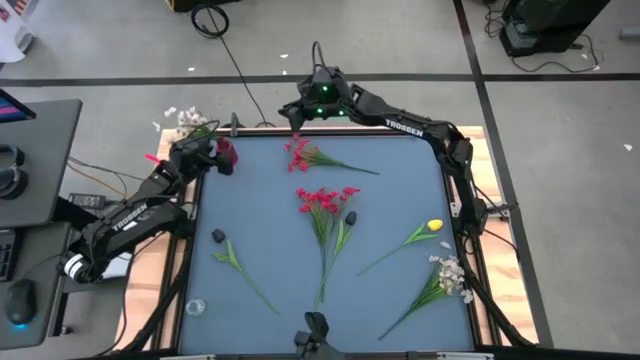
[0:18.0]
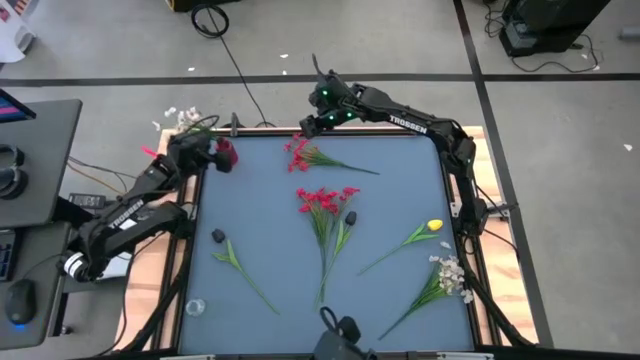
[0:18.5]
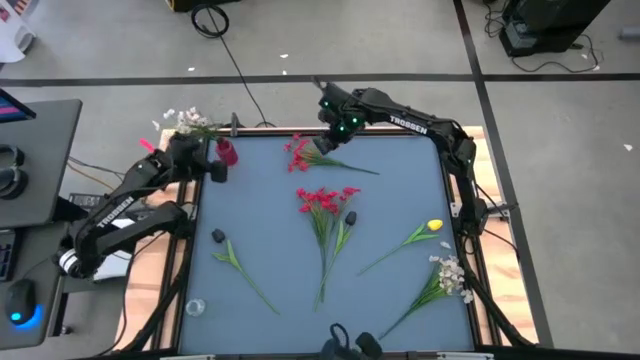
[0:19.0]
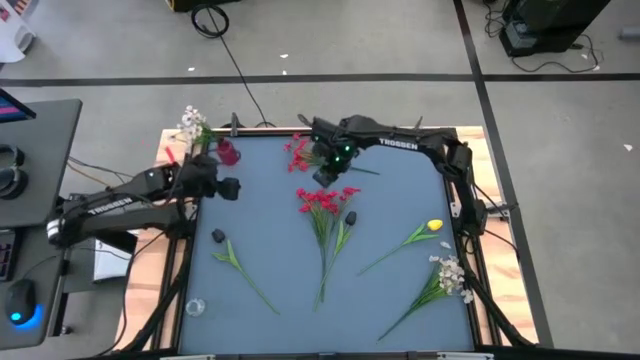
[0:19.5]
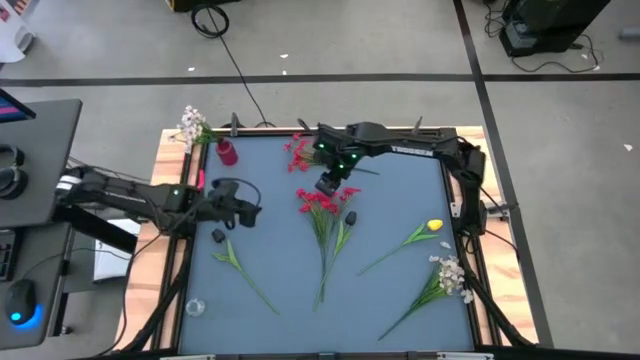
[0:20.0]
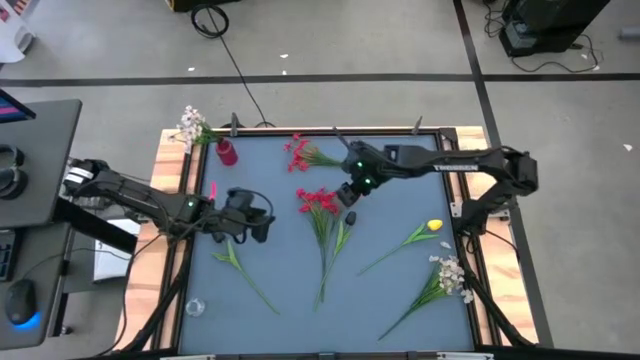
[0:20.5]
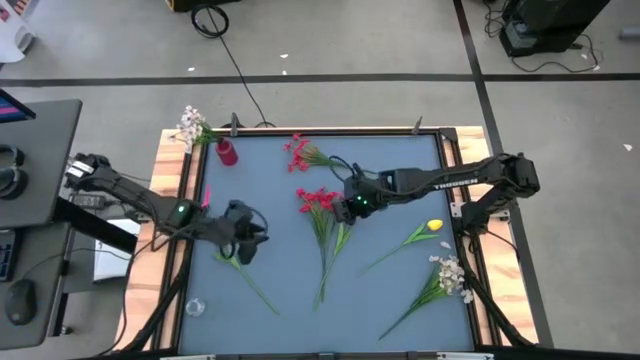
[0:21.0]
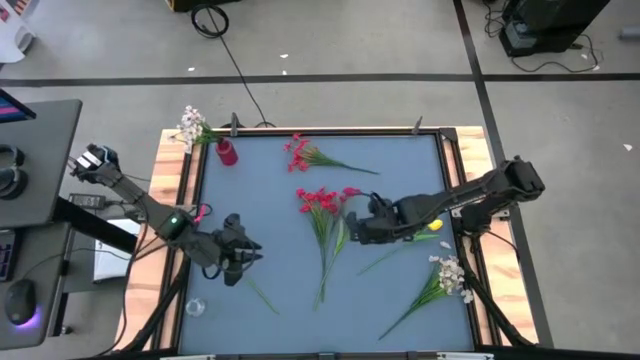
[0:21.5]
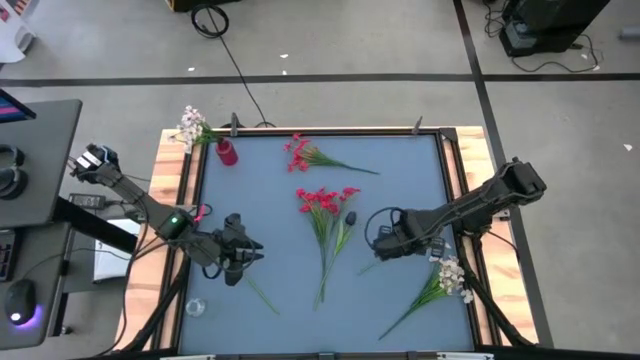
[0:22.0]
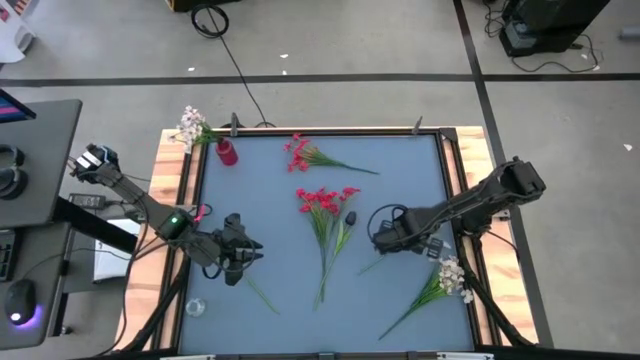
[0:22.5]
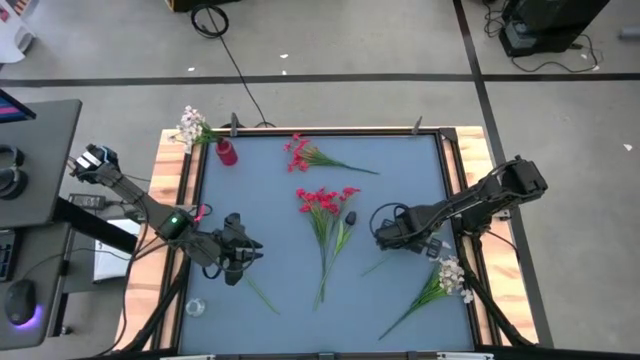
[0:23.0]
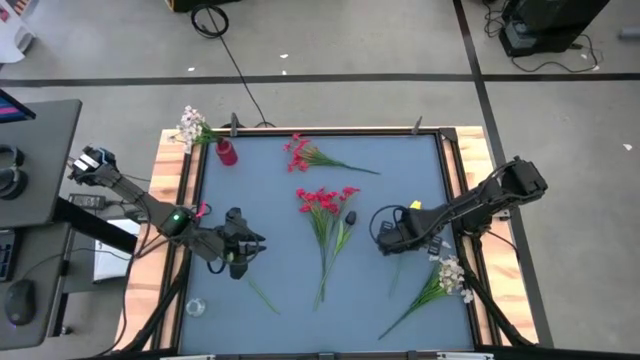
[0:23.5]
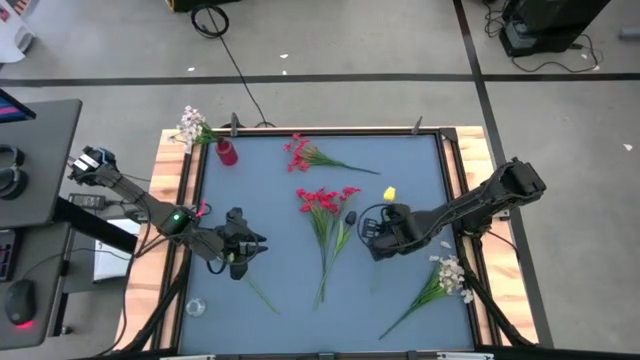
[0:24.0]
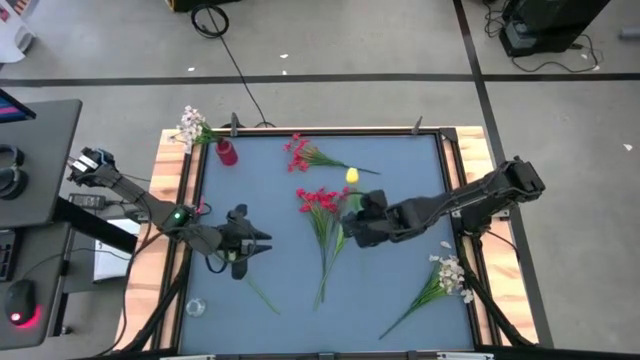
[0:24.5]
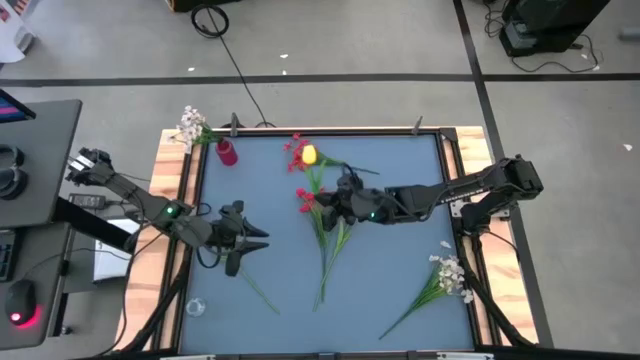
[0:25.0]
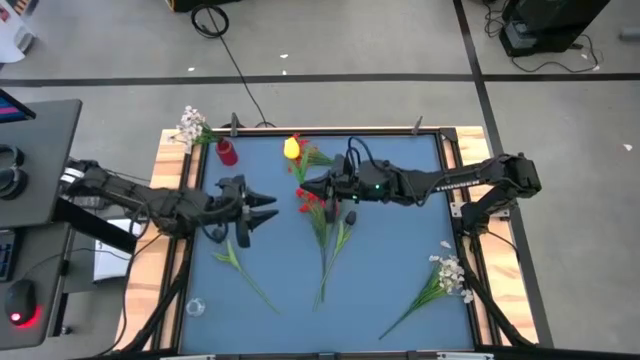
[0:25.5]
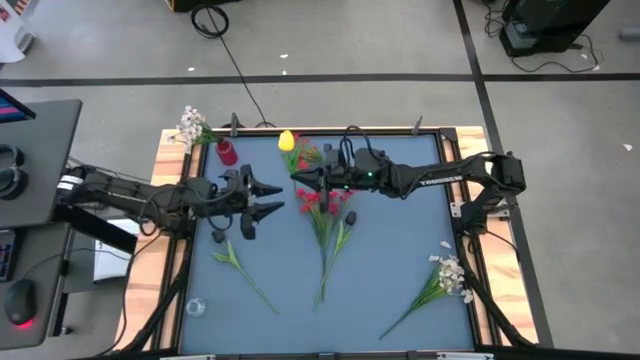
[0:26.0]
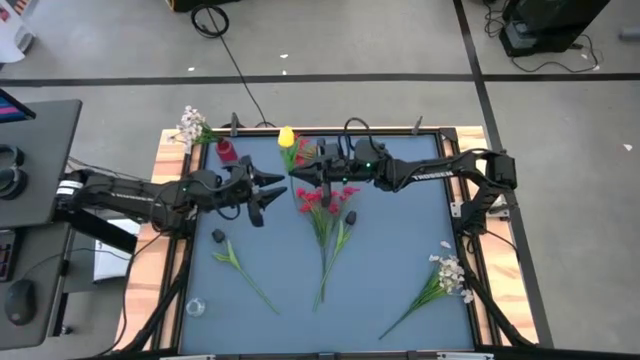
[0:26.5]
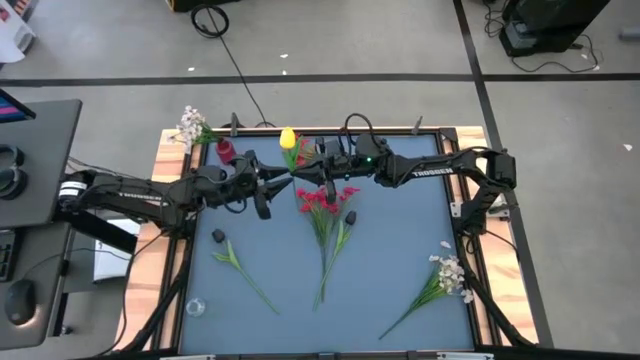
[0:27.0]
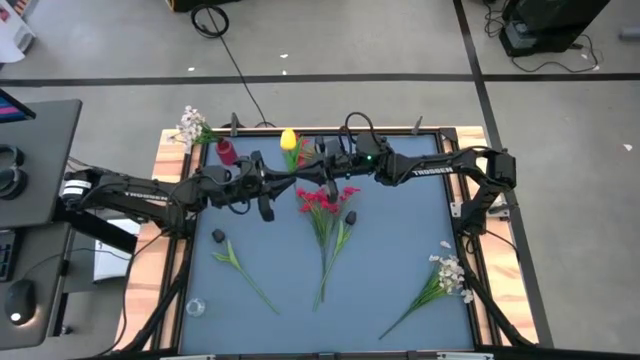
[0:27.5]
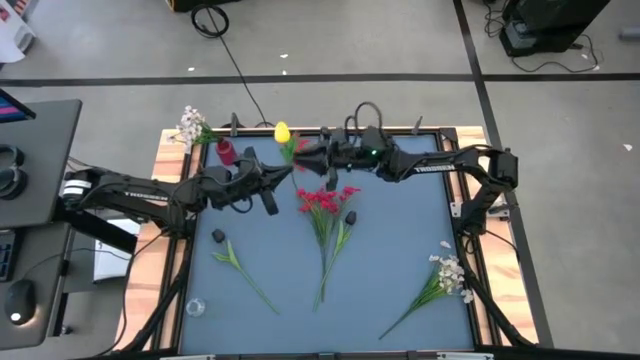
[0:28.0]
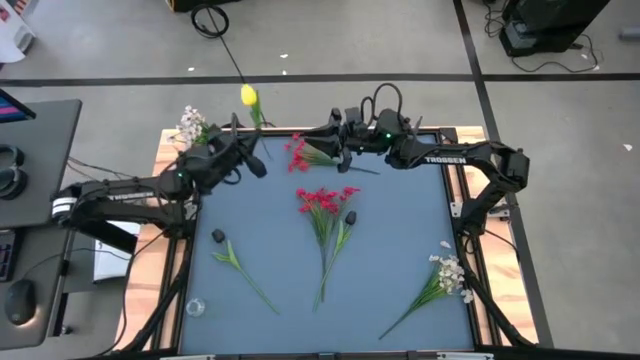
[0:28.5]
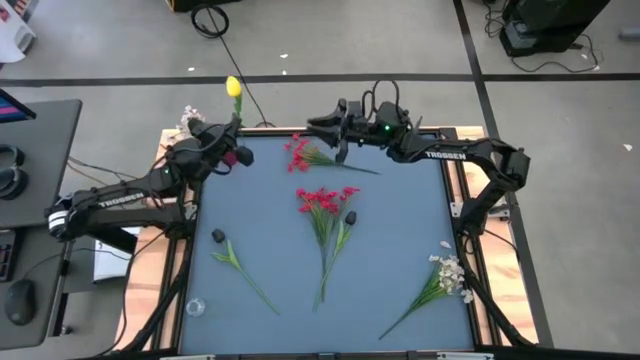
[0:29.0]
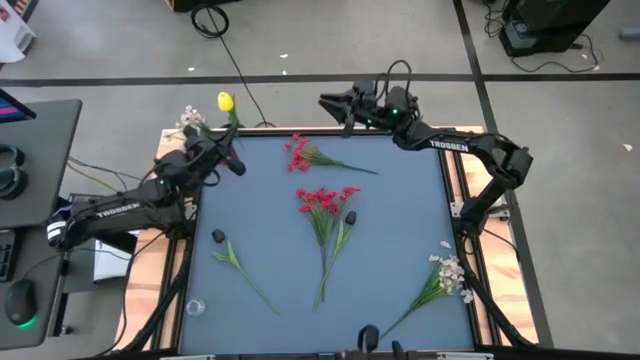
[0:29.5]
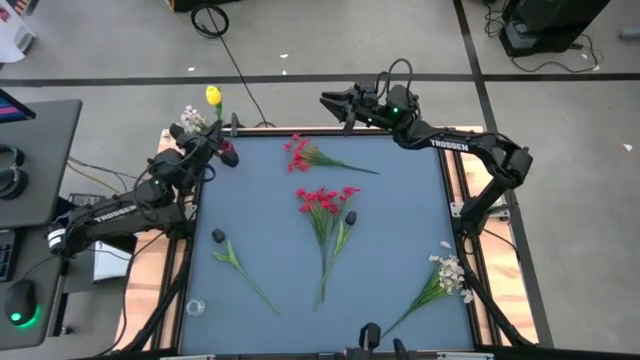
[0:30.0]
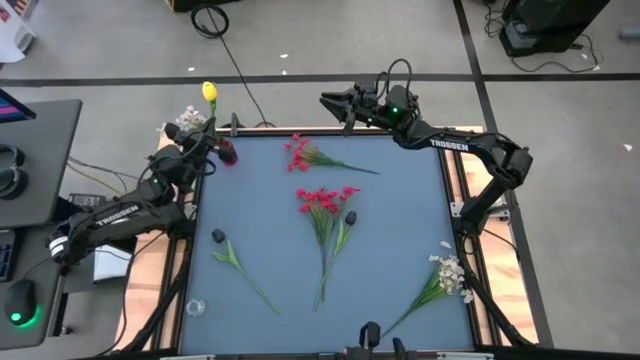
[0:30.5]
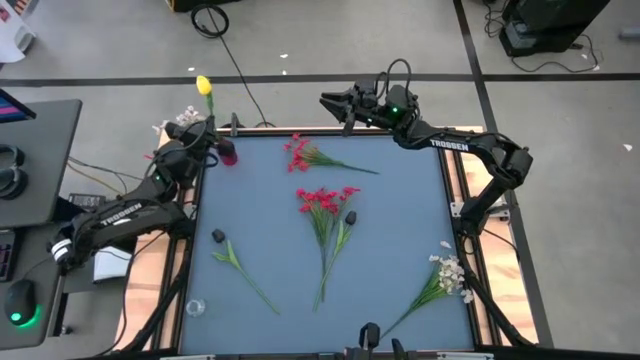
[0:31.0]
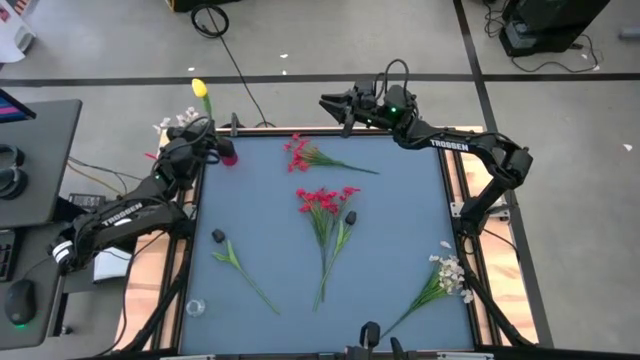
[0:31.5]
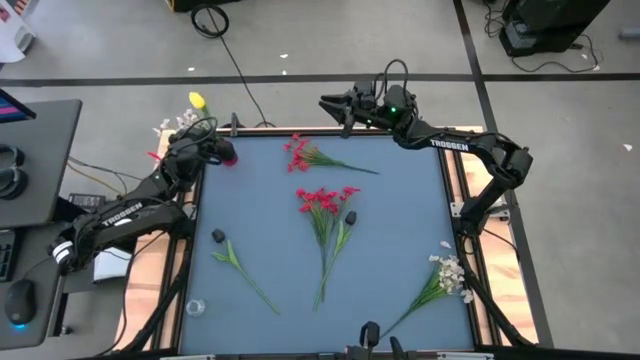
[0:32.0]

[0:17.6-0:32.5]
Task: Sort flowers into vase by color
Put the yellow flower into the red vase
